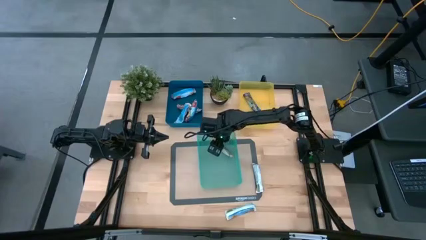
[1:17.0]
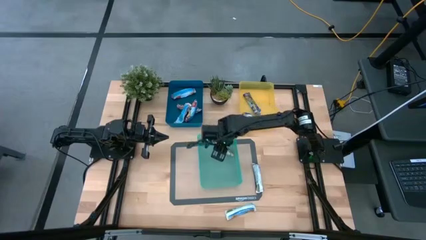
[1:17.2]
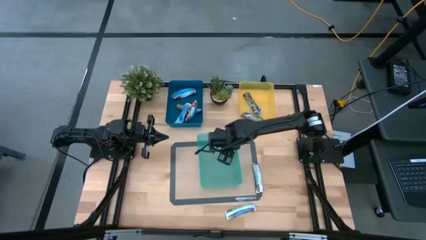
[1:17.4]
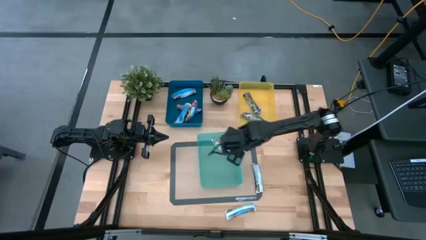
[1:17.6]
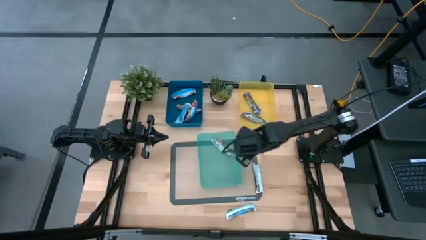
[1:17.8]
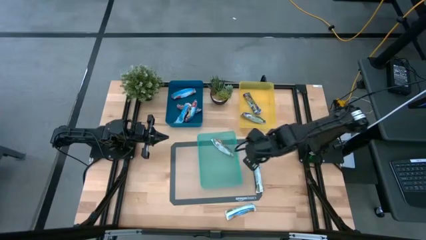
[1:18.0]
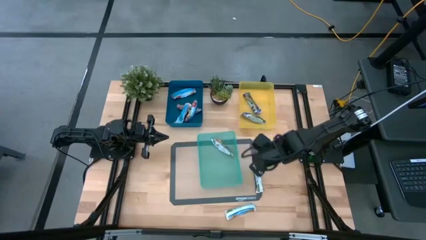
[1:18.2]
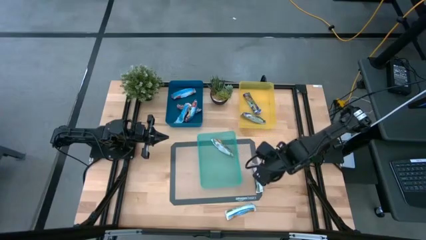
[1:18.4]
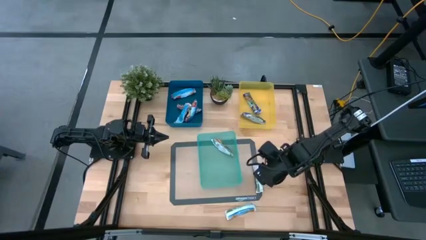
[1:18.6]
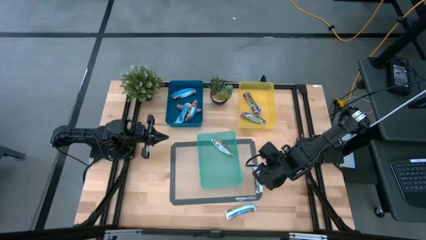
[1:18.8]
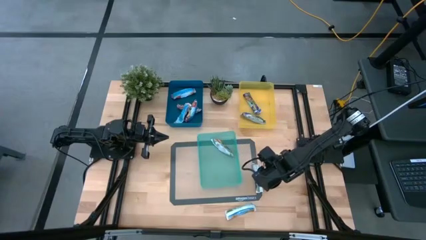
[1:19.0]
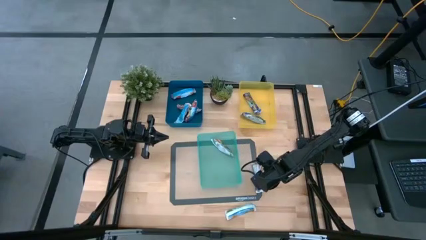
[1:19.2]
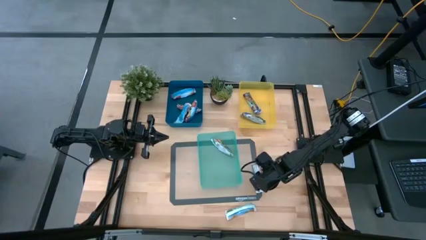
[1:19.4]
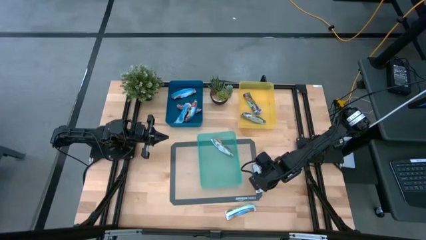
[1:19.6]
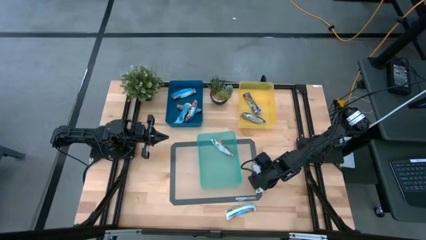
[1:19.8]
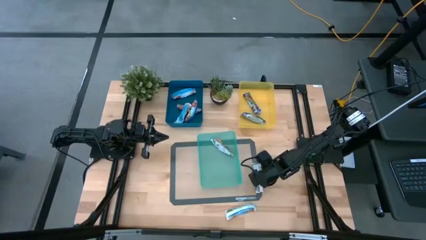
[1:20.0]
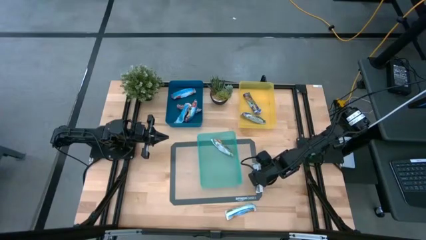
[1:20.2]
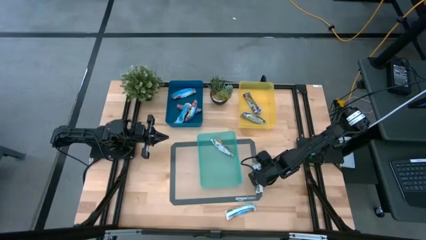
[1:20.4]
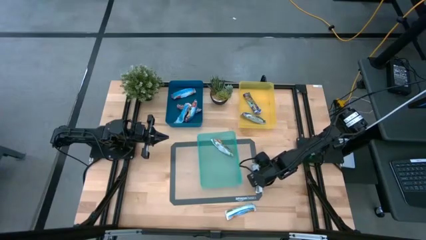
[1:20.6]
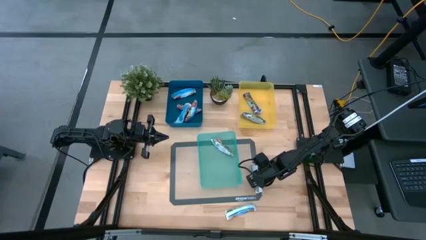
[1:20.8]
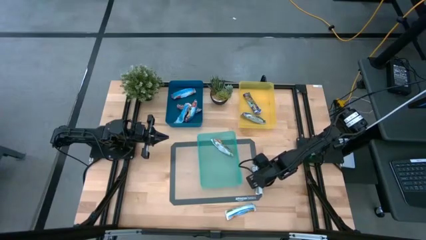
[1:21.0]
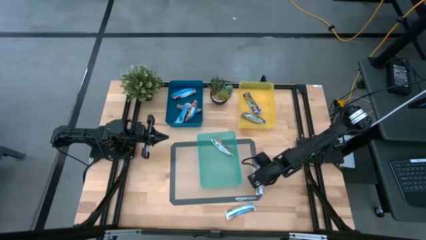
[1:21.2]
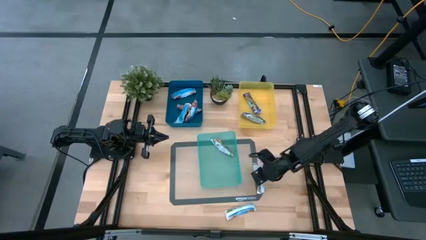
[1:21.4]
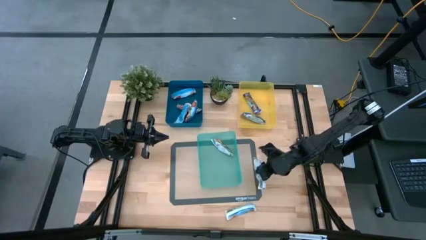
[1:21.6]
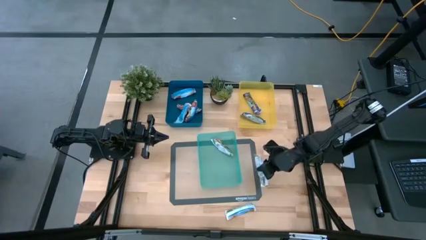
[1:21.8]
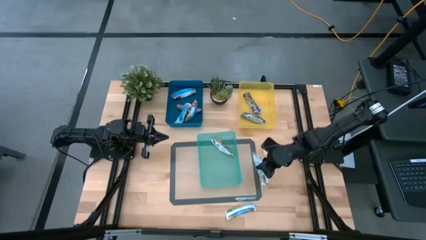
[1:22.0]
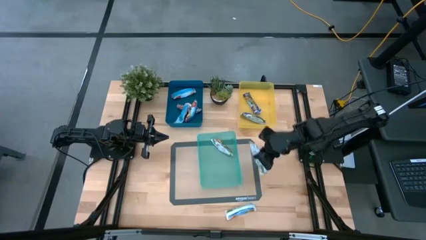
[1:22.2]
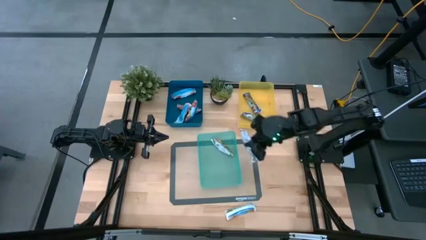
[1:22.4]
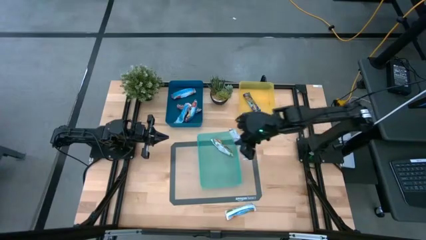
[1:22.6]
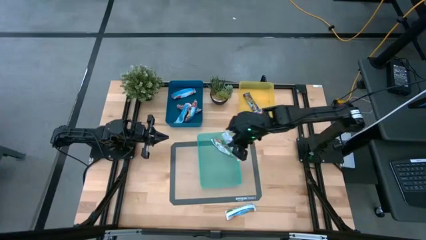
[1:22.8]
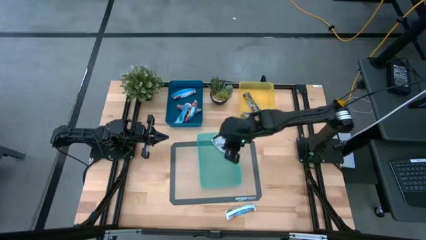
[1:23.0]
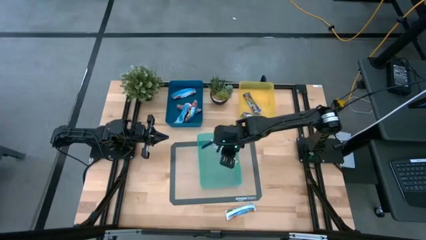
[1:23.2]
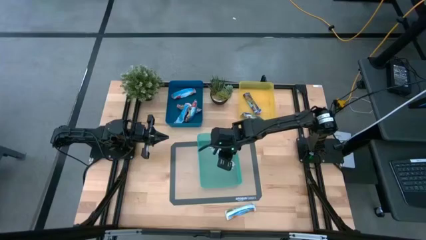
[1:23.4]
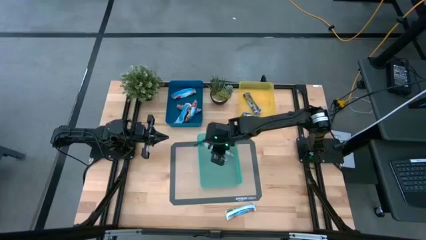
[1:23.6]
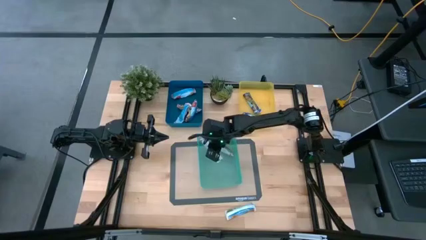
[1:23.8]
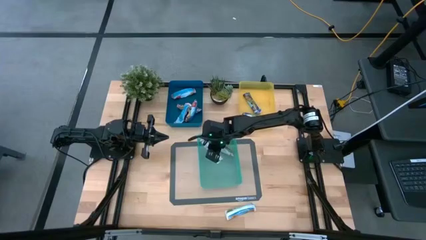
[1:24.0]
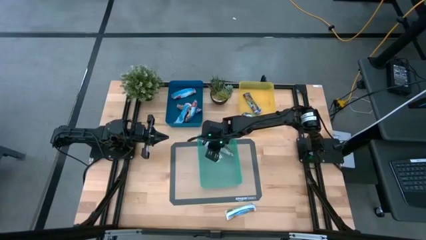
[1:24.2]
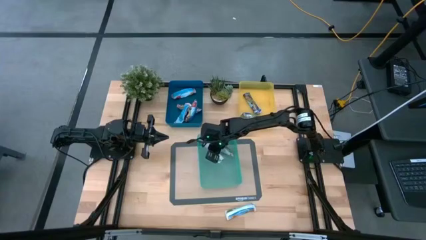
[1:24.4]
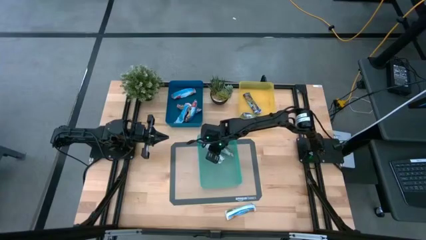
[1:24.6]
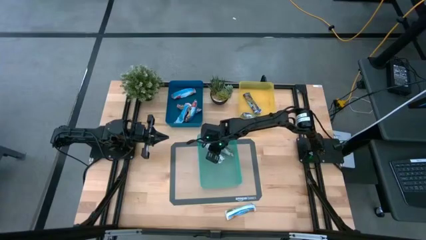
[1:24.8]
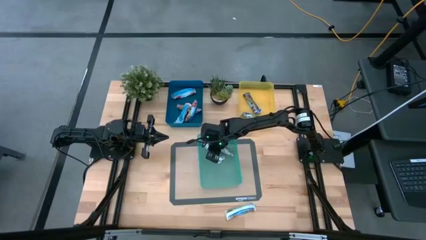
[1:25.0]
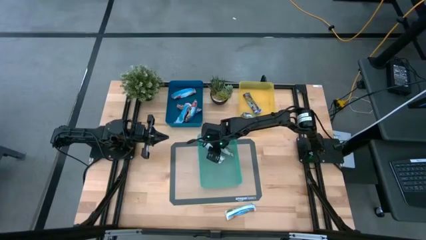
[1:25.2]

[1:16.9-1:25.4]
Task: Pick and place Granola Bars by type
Put the yellow granola bar into the green bin

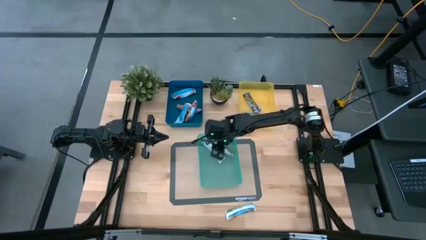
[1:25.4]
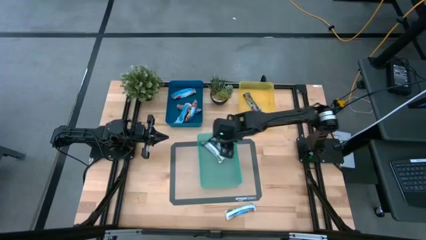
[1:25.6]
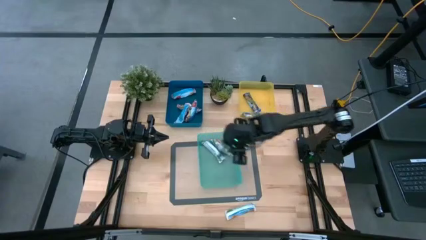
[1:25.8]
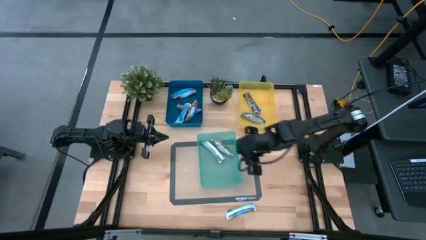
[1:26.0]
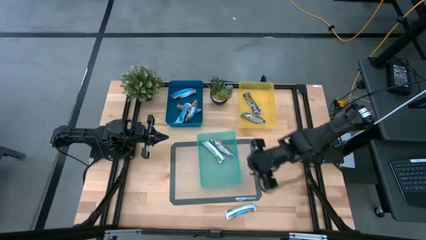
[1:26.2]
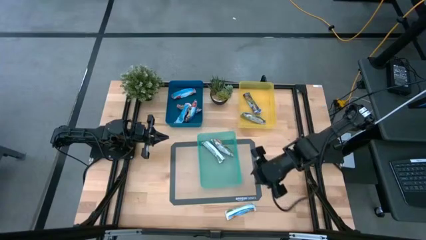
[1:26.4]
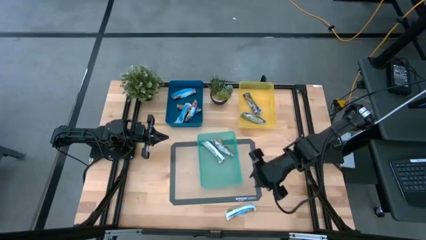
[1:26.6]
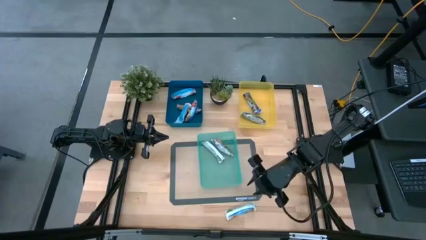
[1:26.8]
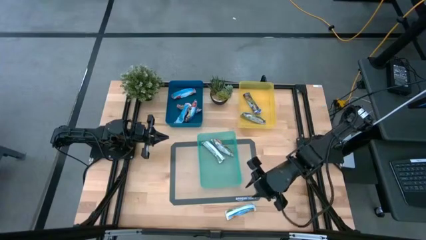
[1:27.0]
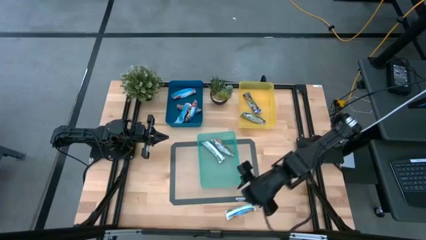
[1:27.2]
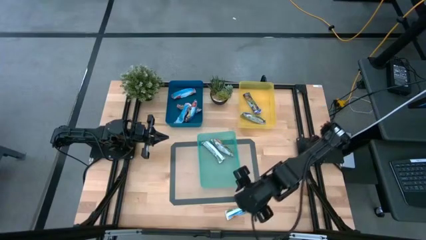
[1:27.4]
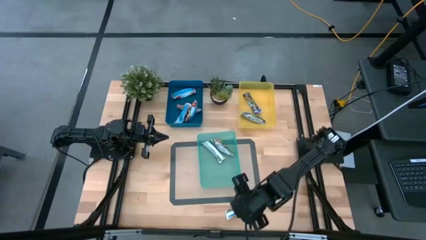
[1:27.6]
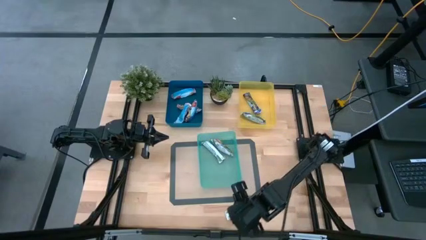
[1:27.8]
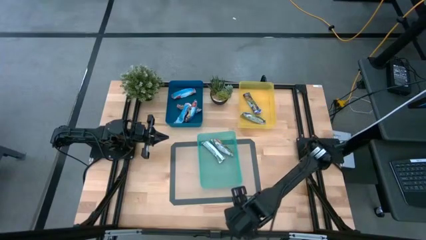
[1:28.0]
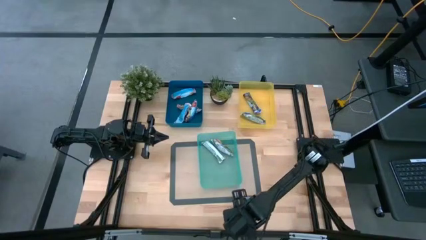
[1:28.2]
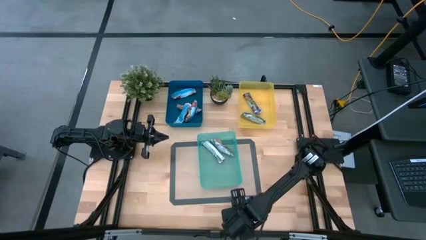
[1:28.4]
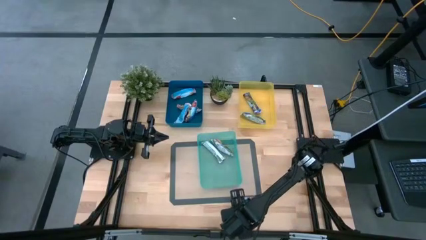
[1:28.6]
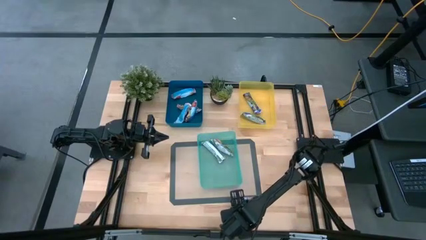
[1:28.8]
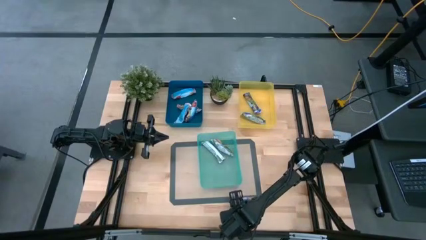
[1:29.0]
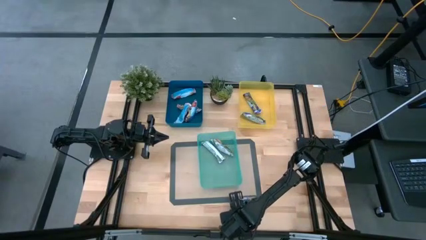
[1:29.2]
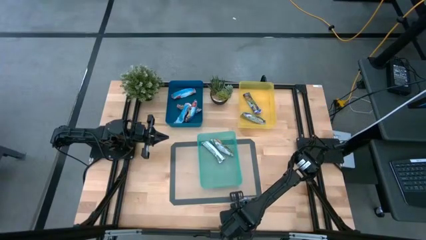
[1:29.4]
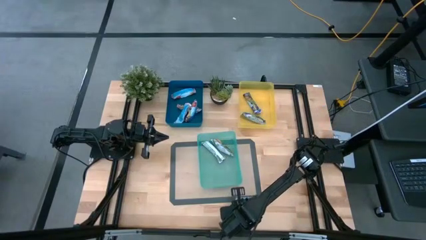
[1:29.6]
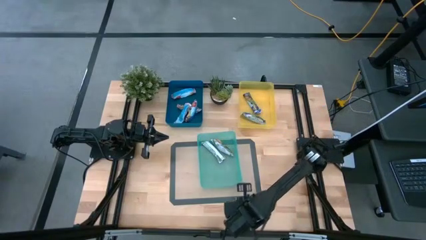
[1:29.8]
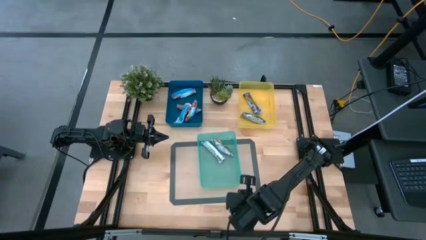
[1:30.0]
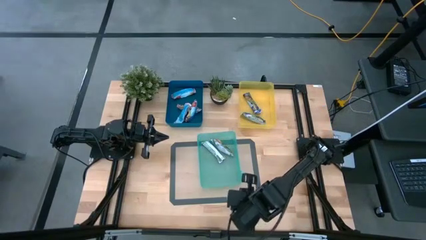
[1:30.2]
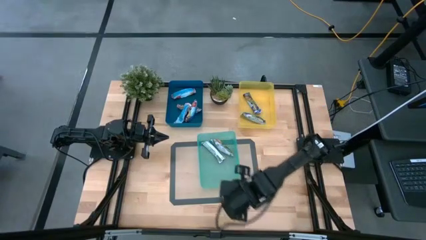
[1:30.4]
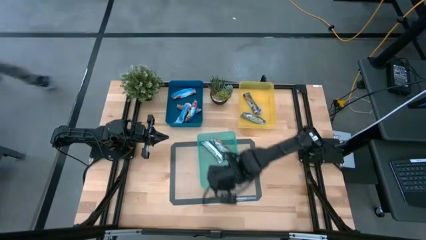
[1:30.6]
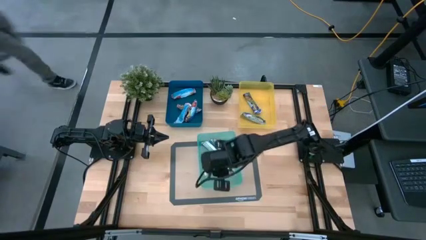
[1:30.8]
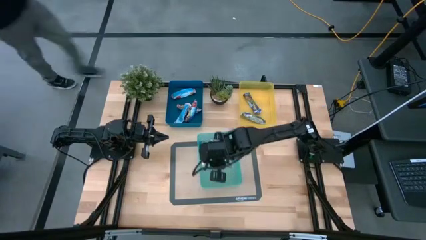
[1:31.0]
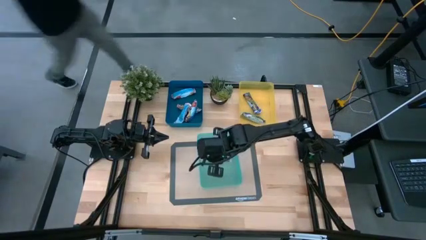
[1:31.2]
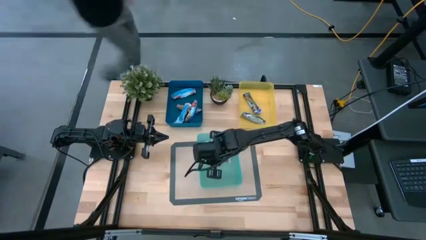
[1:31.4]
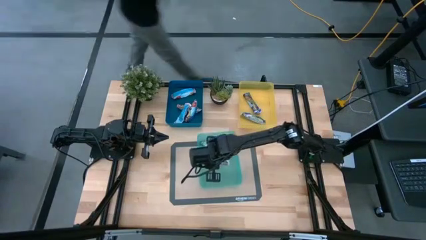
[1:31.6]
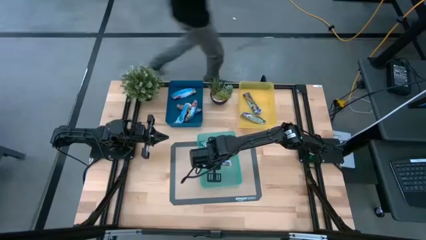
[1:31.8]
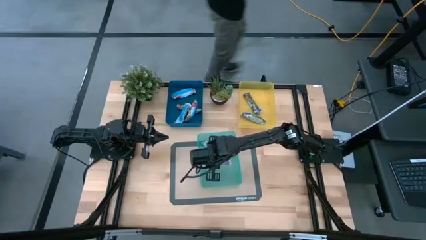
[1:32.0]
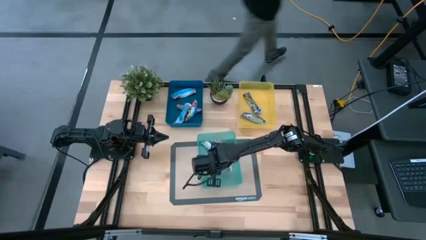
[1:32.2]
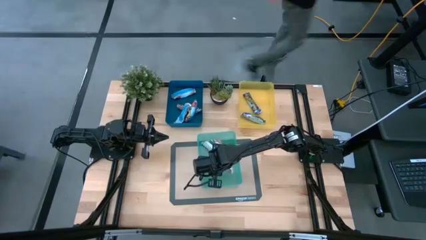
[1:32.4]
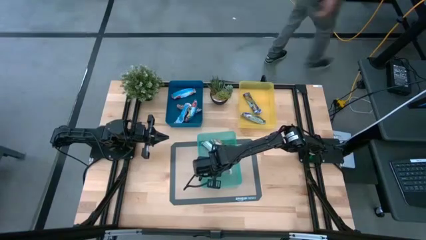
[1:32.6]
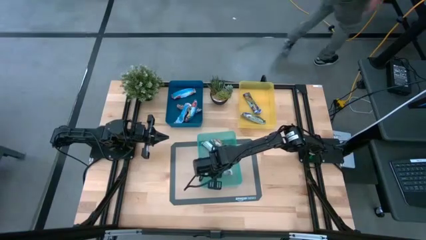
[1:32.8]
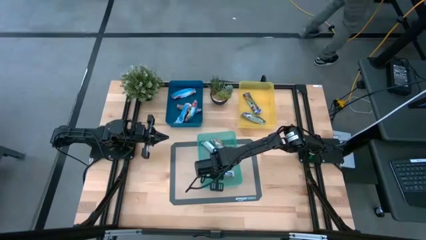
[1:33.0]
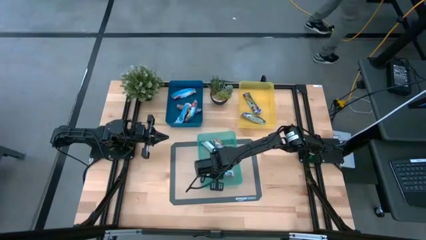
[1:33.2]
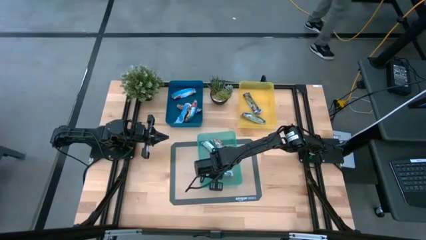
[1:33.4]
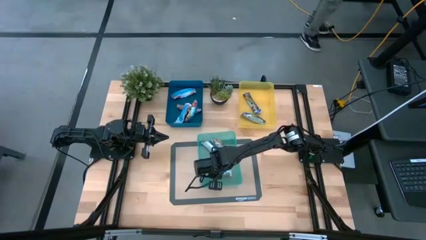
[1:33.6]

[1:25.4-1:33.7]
Put the yellow granola bar into the green bin

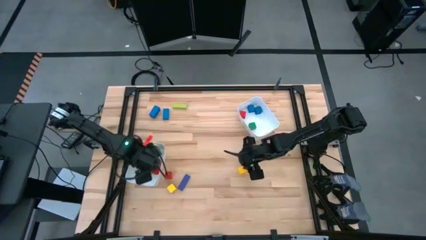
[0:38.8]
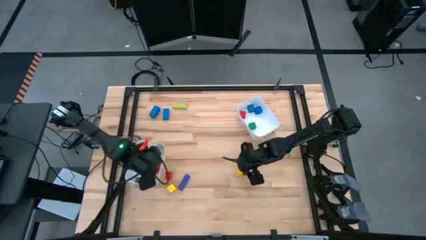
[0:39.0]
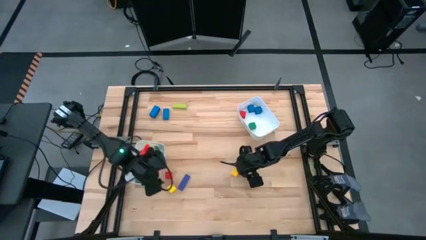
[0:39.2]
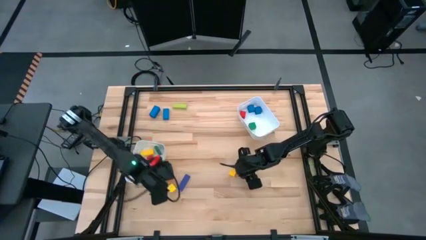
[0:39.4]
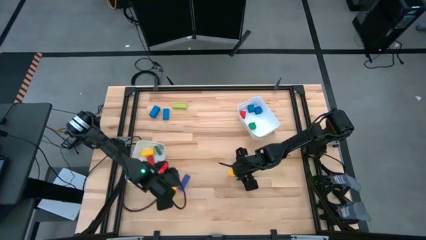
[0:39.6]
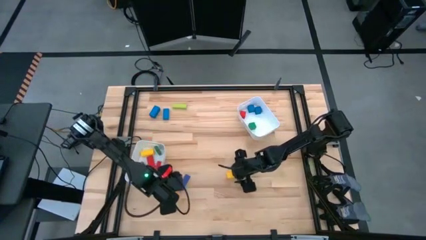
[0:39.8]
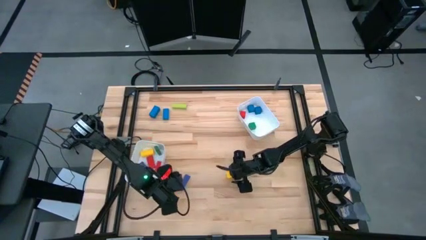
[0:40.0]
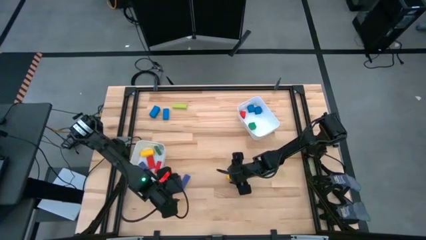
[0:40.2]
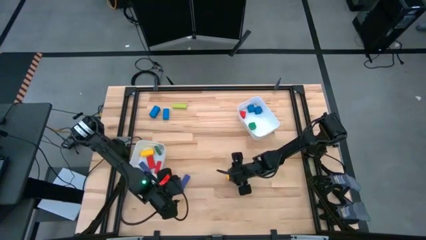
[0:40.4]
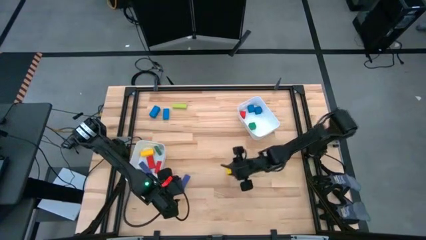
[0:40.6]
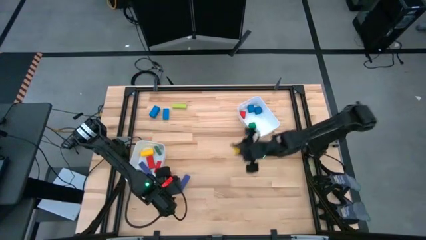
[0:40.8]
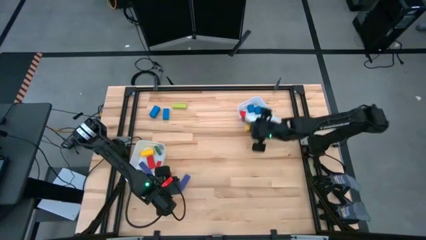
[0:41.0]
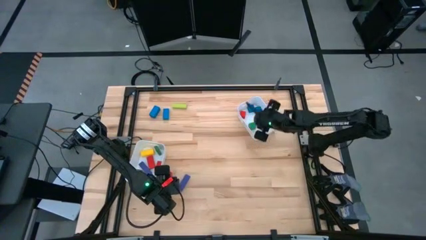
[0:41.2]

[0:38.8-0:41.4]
Task: Sort blocks by size
Put the small yellow block into the right white bin
